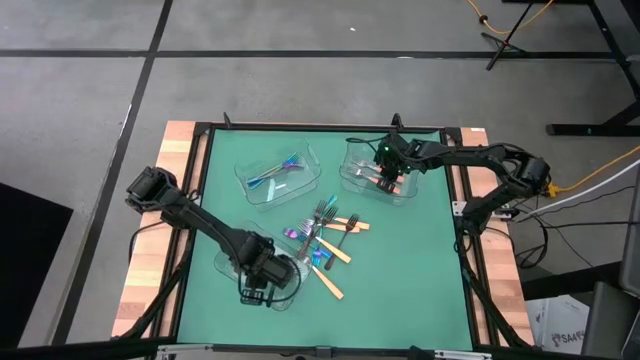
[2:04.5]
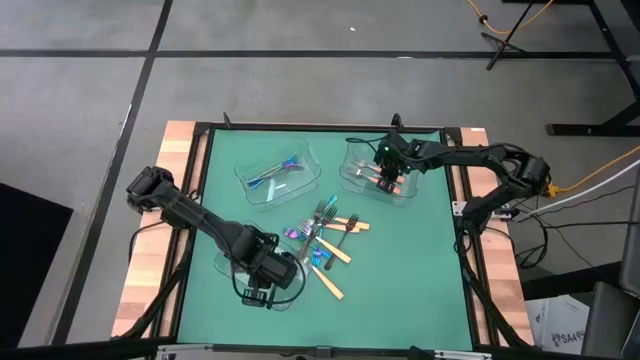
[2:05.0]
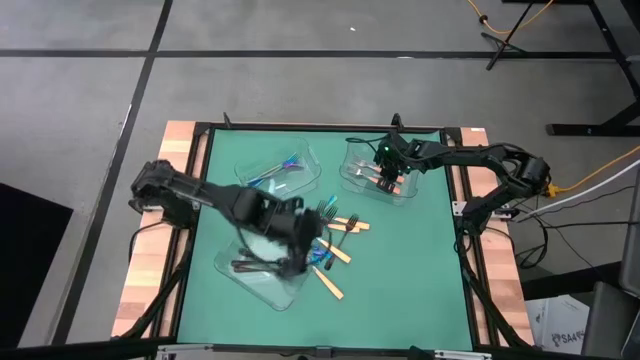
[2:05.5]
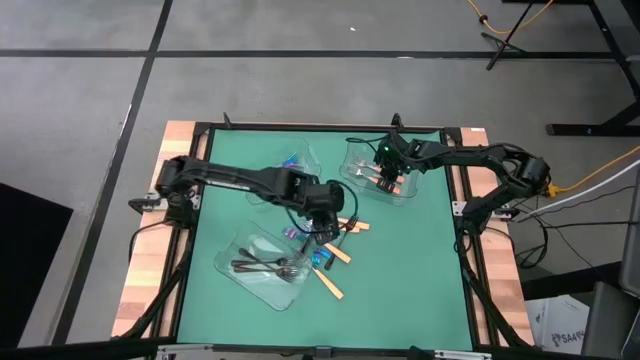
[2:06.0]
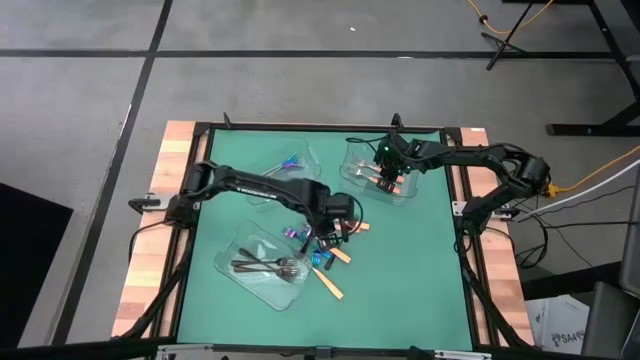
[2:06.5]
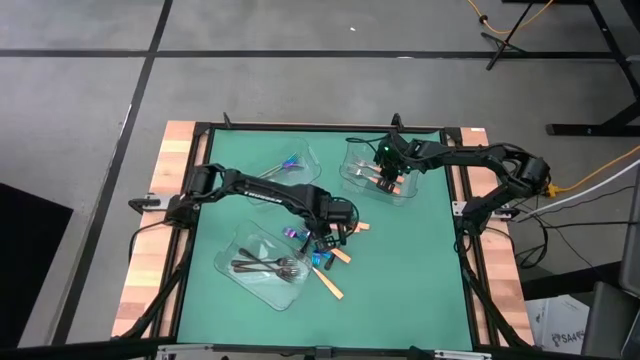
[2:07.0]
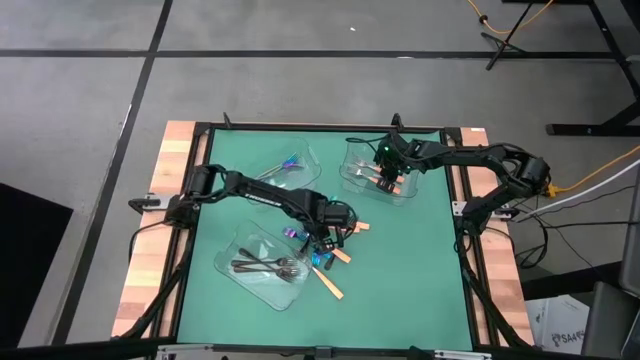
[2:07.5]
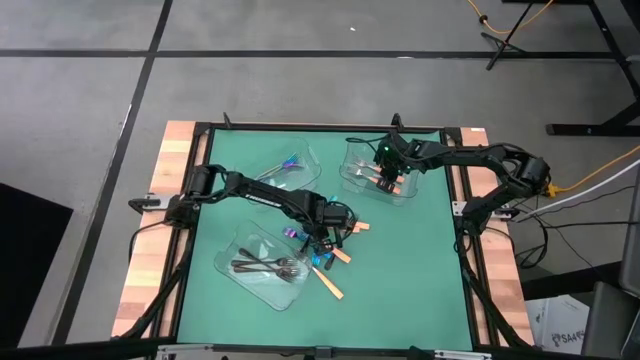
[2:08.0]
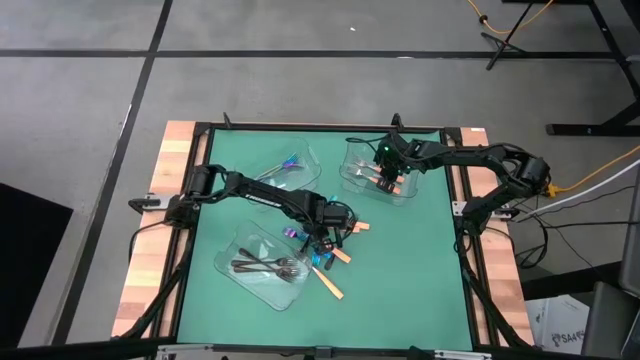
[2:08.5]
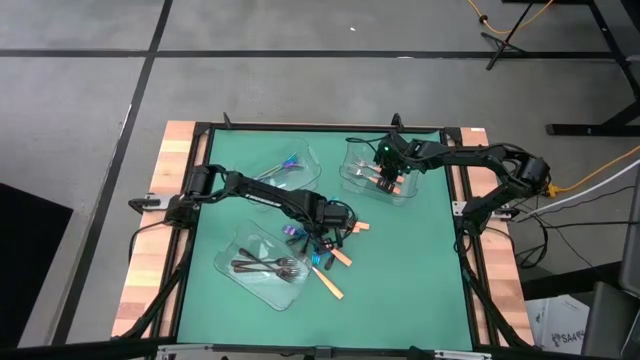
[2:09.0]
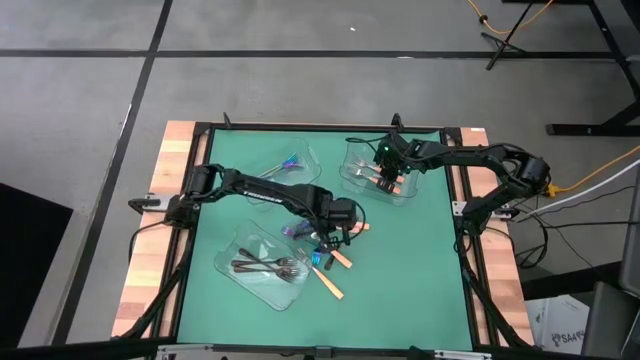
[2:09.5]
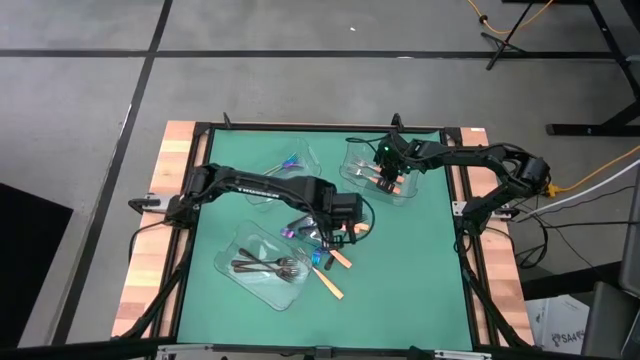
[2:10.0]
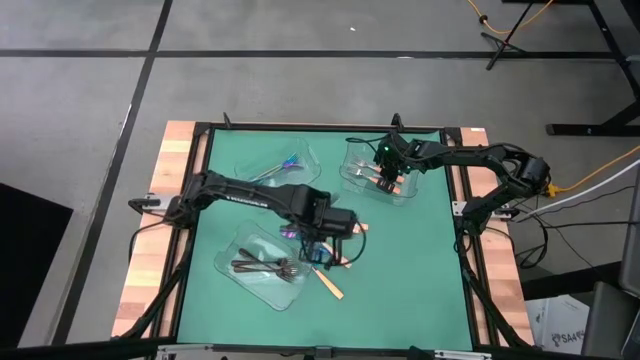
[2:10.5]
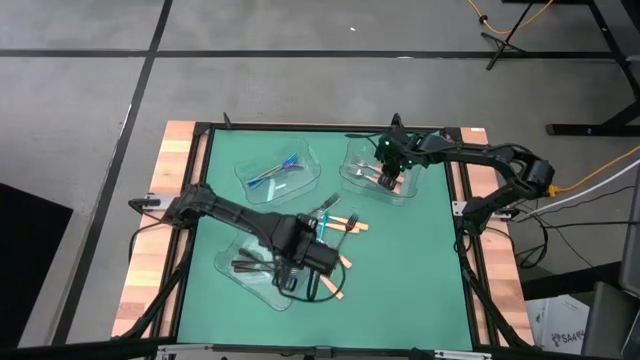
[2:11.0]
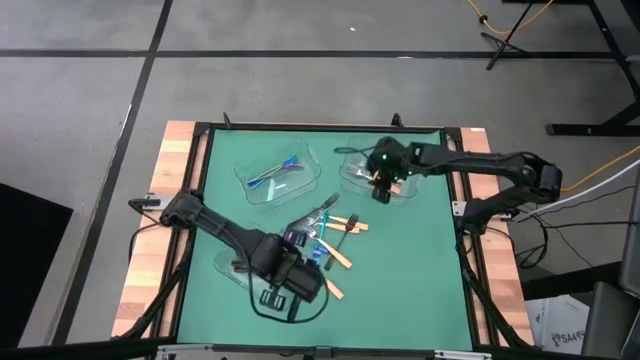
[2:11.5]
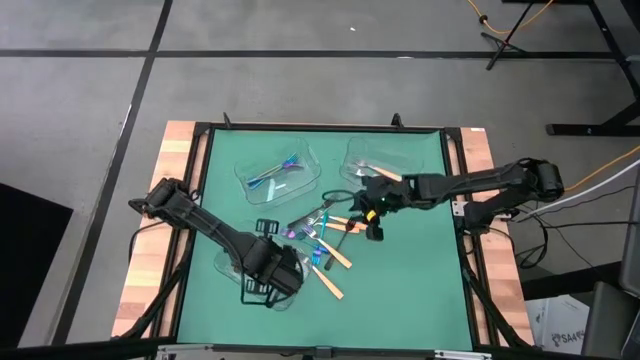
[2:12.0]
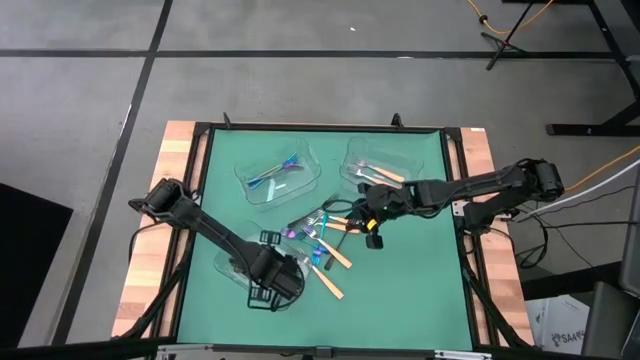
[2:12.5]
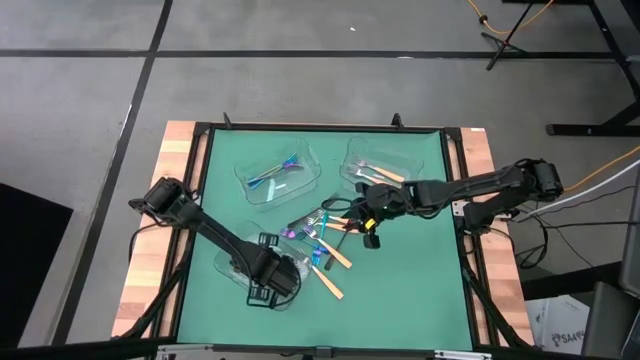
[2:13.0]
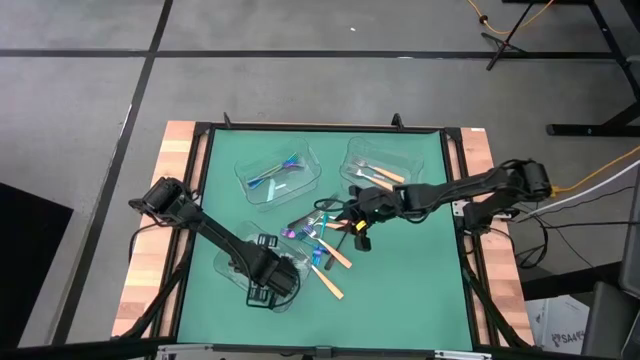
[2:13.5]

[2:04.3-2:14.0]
Task: Sort silverware by color (type)
Put the black fork into the bottom transparent bin

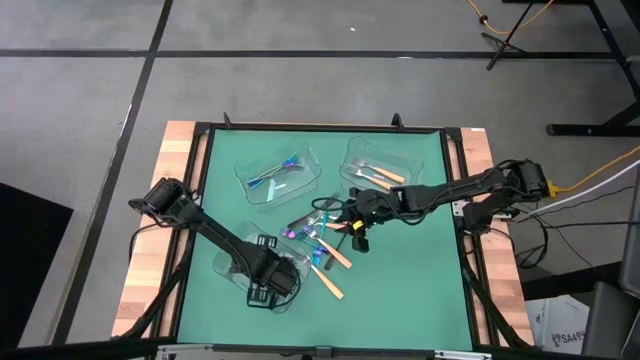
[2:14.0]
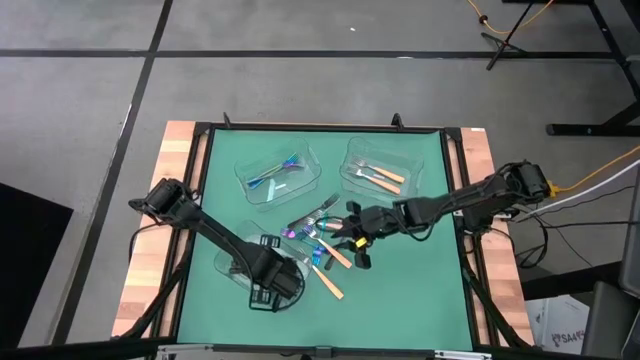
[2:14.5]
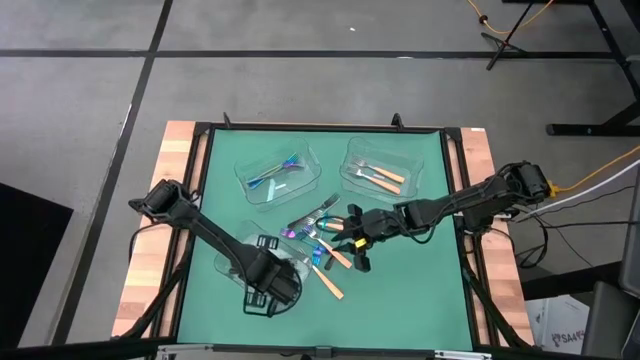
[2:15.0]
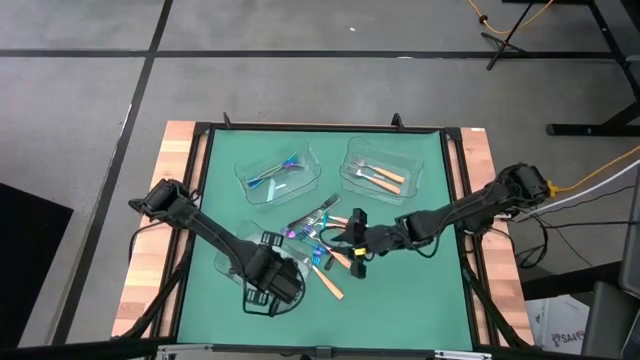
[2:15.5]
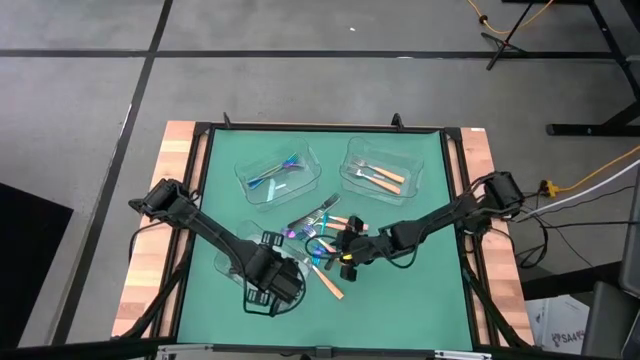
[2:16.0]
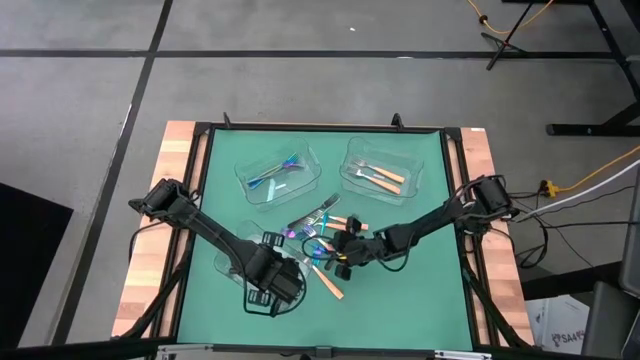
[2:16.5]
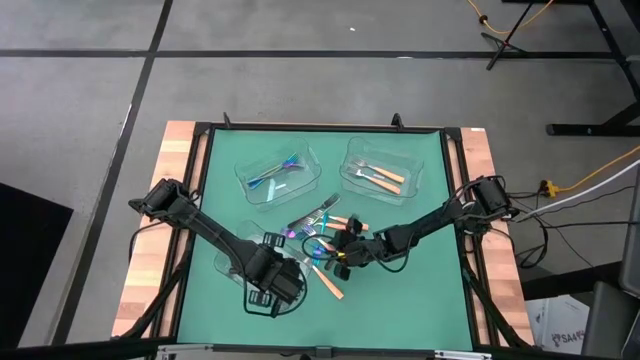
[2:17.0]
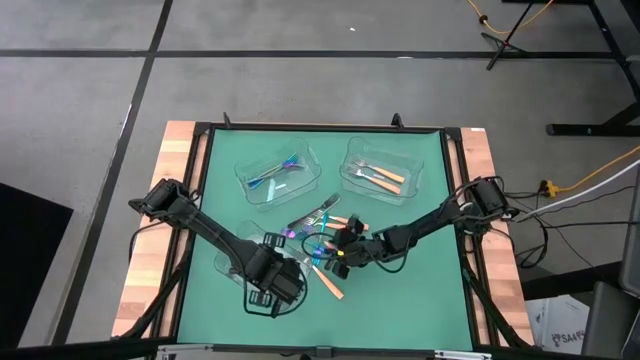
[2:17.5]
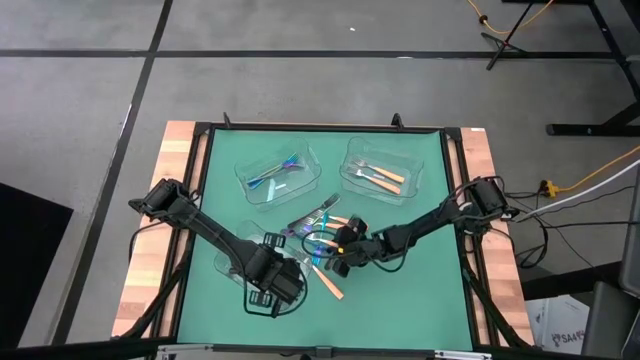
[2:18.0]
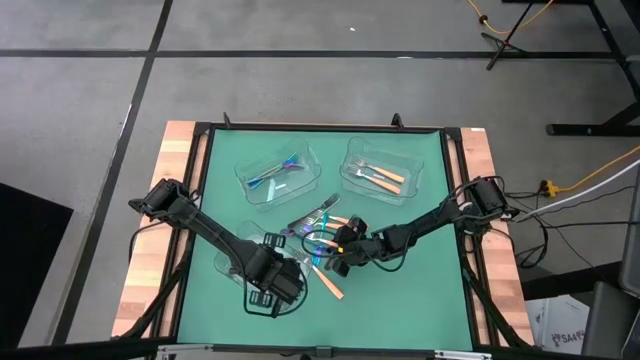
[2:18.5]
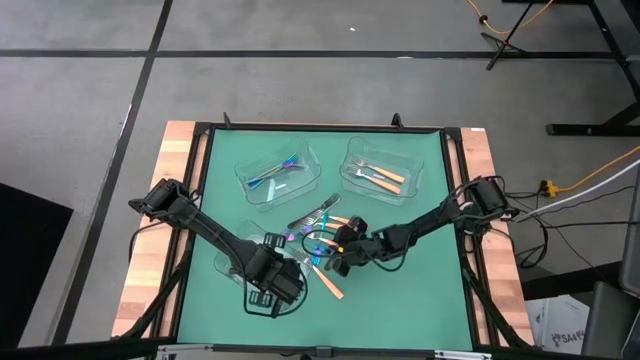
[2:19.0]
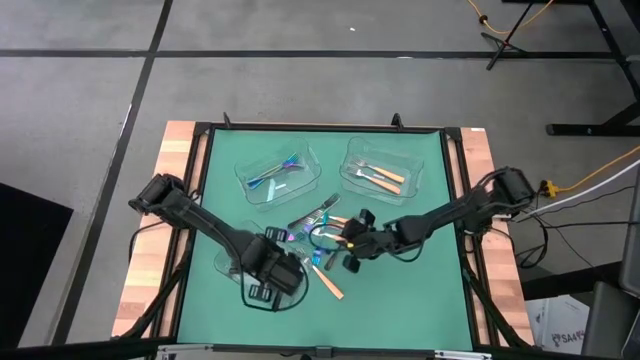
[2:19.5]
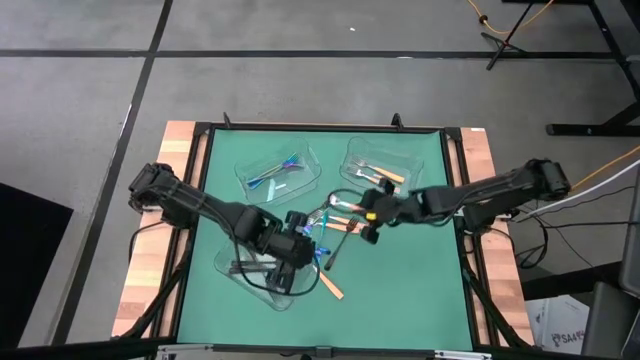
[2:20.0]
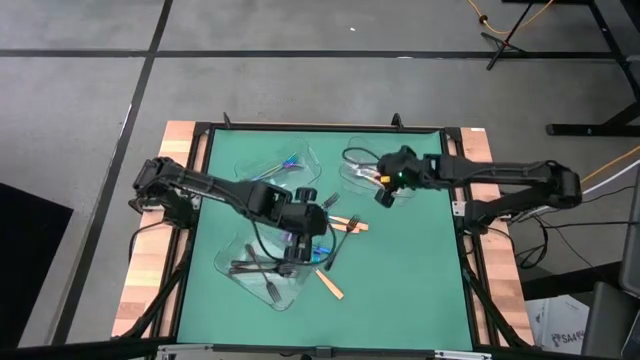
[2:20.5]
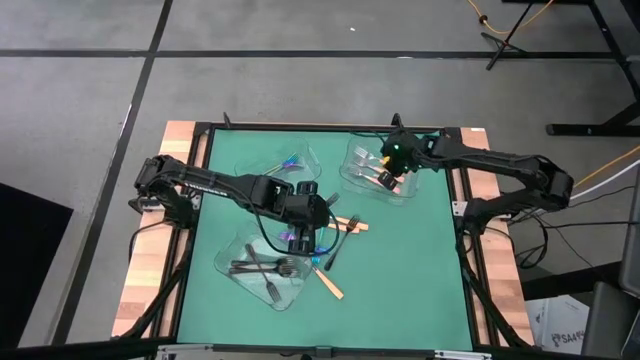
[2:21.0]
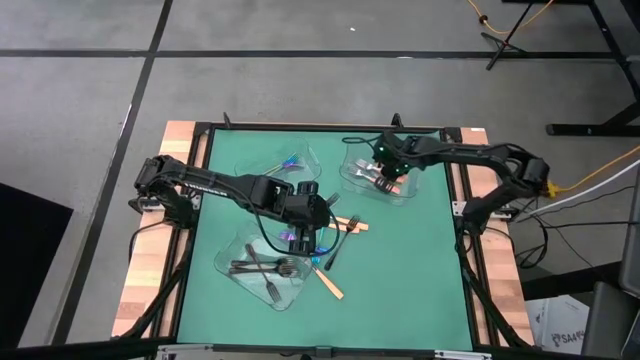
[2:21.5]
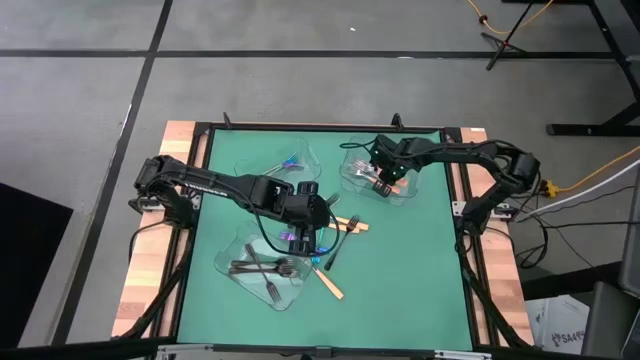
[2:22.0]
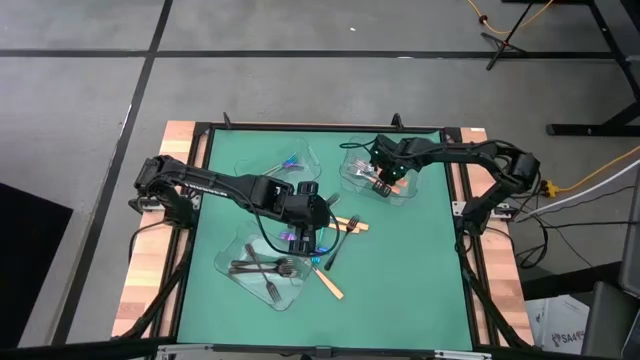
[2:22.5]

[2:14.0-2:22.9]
Put the yellow fork into the top right transparent bin
